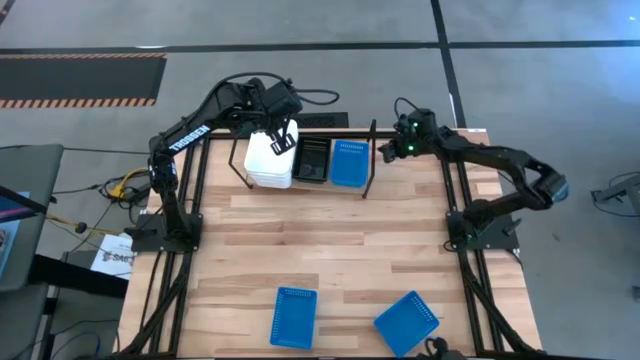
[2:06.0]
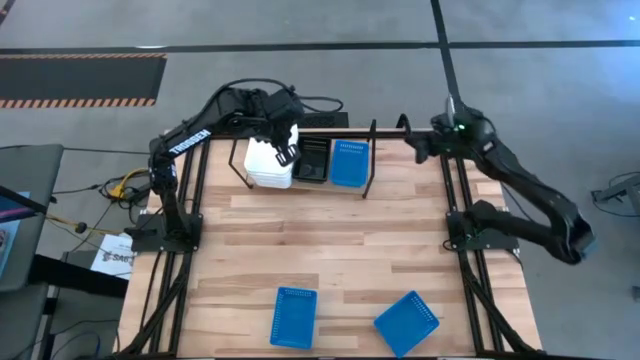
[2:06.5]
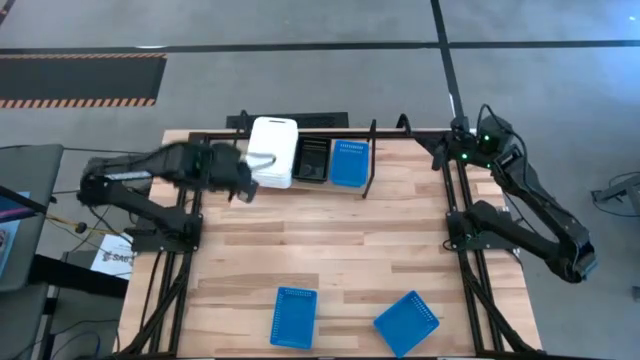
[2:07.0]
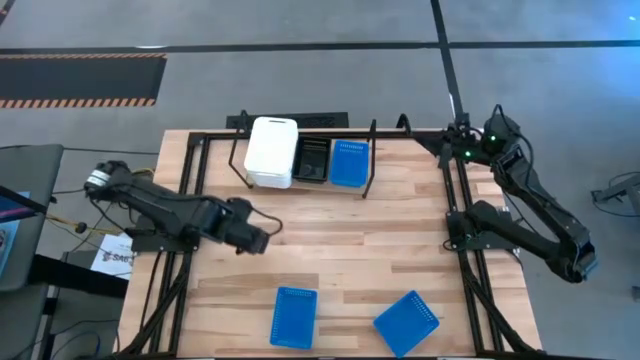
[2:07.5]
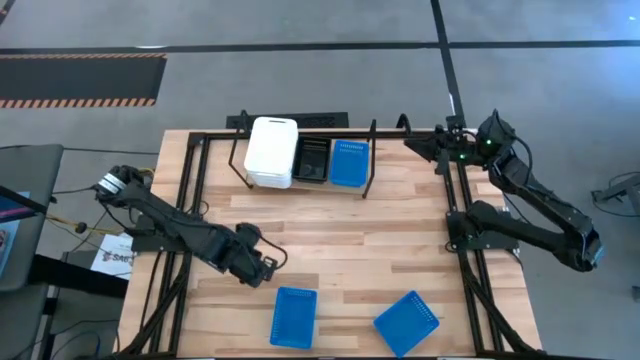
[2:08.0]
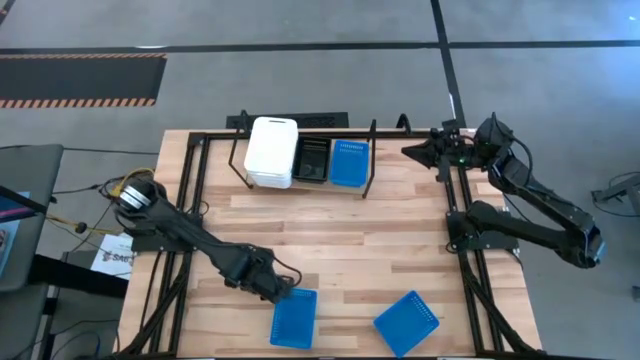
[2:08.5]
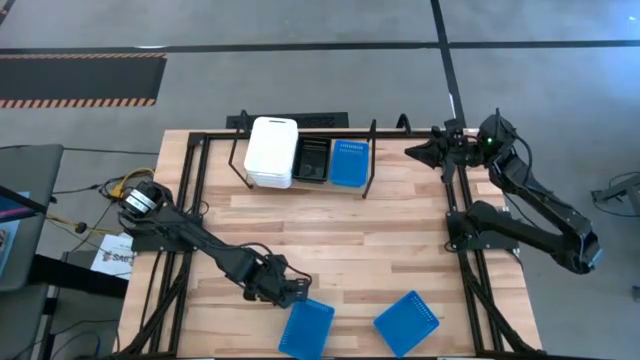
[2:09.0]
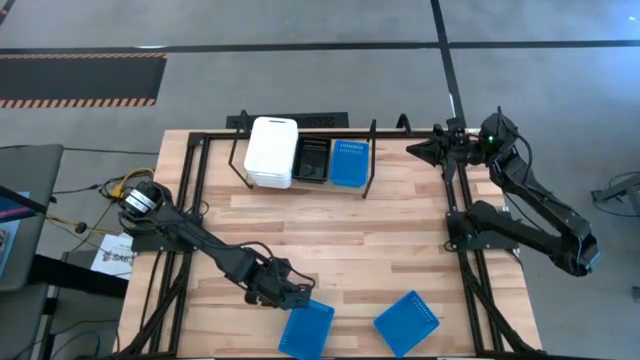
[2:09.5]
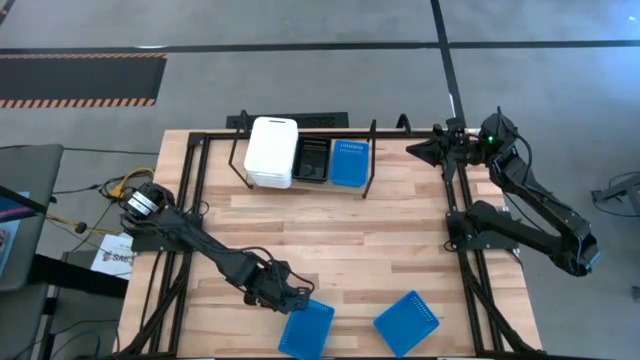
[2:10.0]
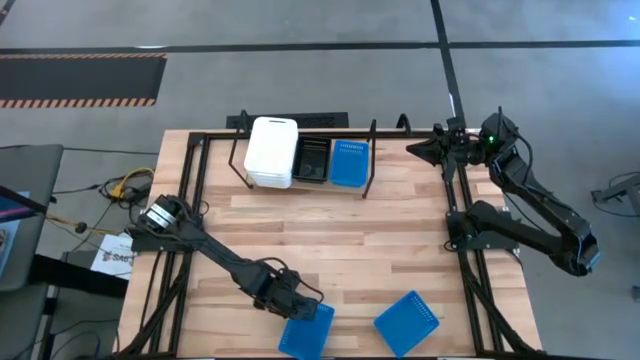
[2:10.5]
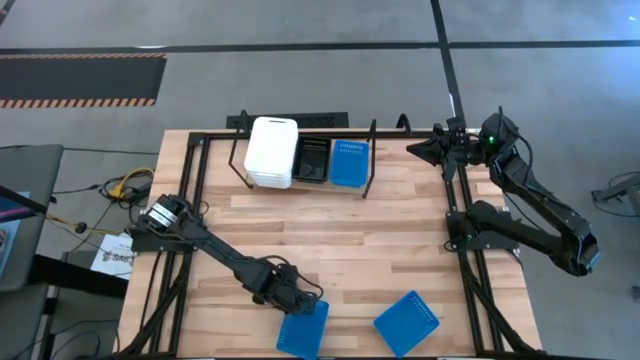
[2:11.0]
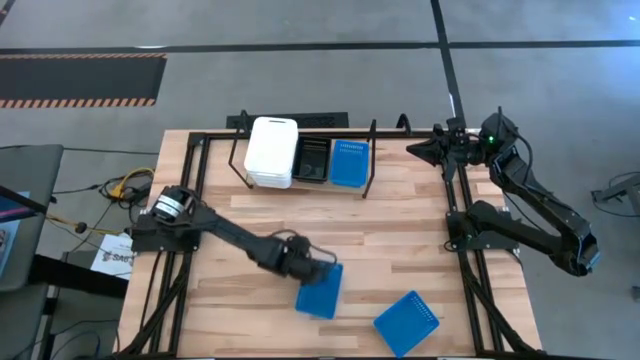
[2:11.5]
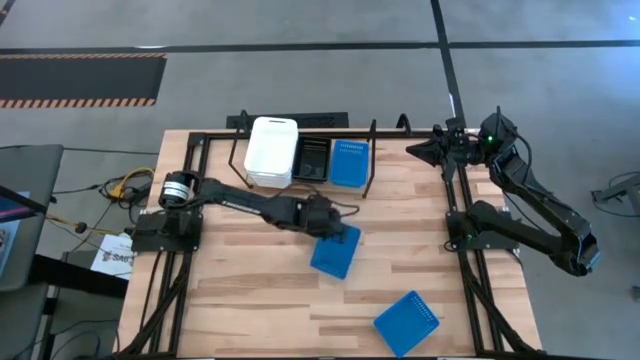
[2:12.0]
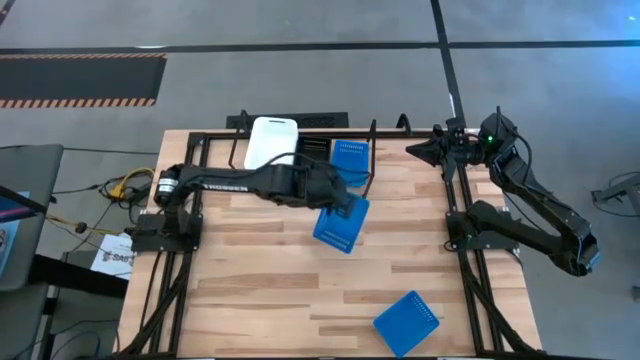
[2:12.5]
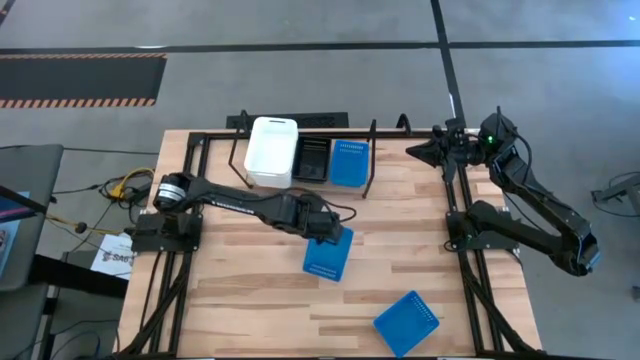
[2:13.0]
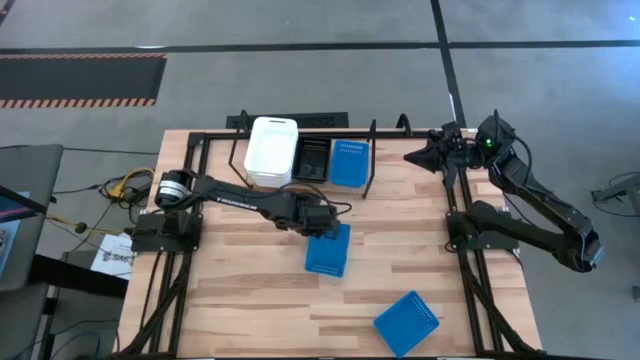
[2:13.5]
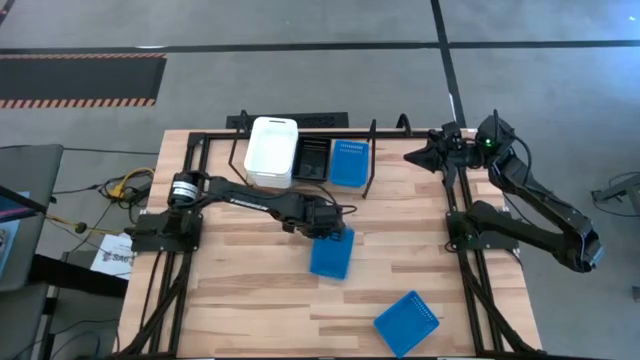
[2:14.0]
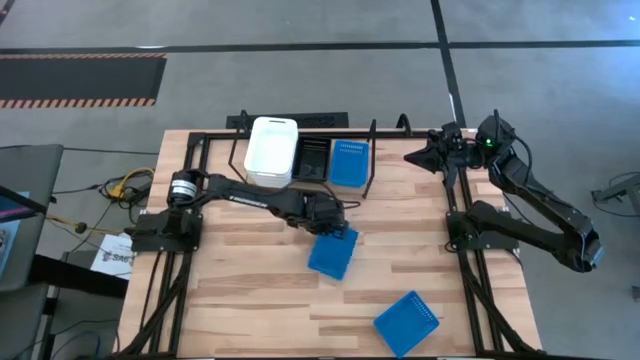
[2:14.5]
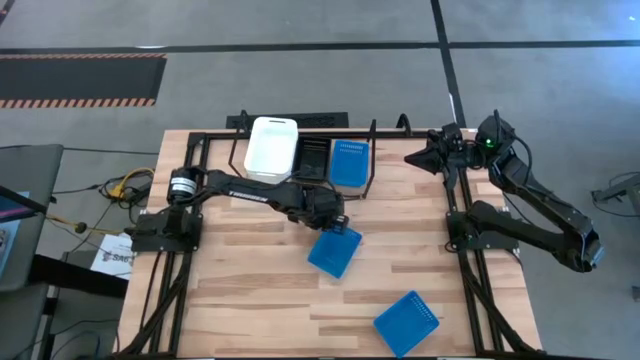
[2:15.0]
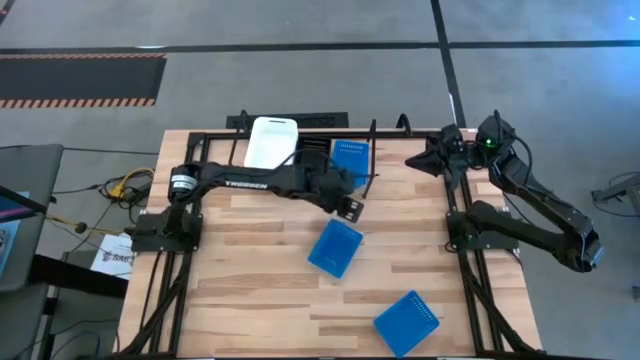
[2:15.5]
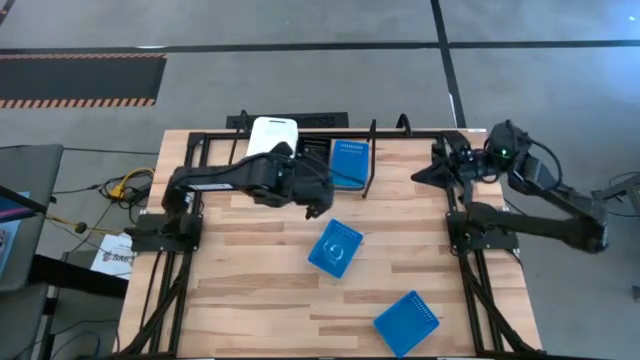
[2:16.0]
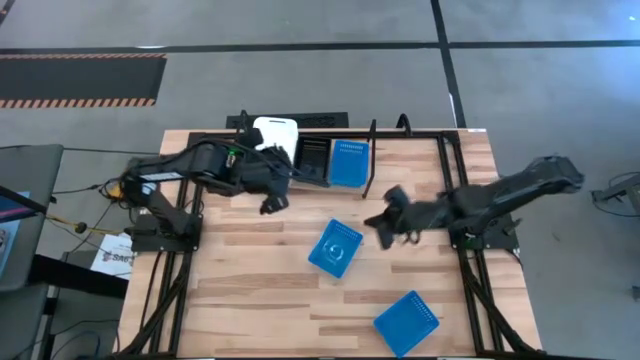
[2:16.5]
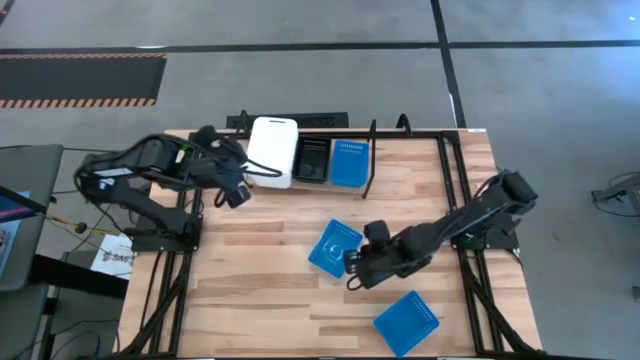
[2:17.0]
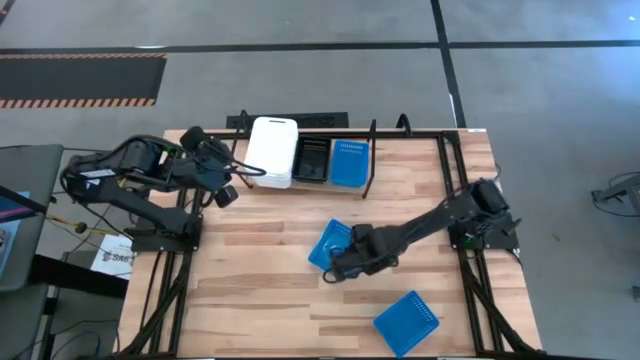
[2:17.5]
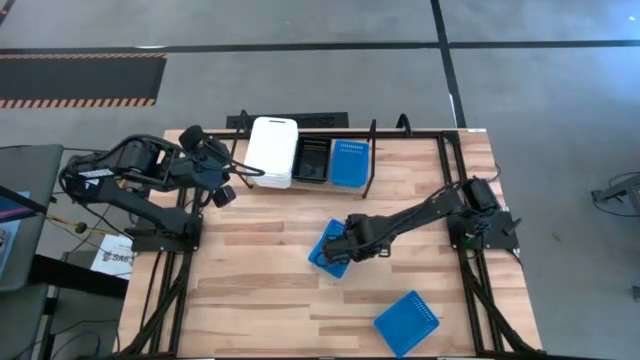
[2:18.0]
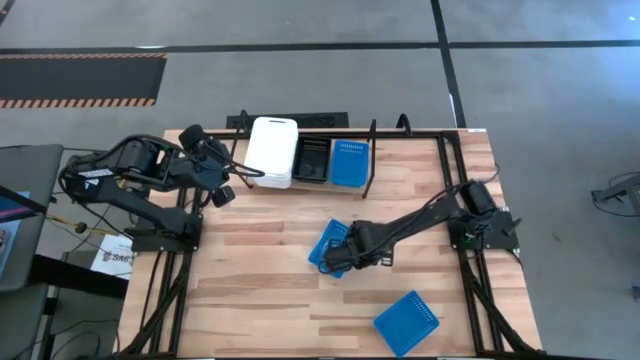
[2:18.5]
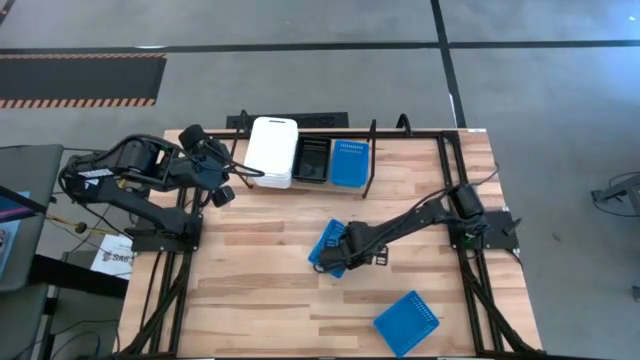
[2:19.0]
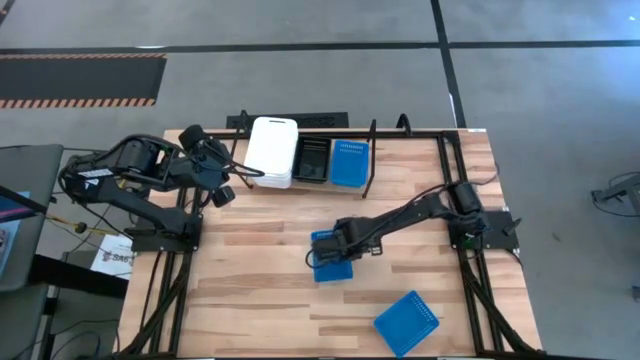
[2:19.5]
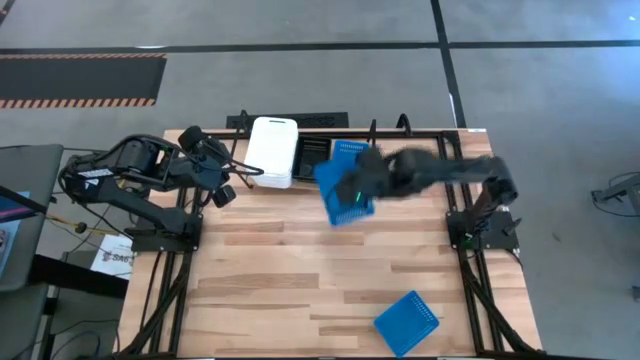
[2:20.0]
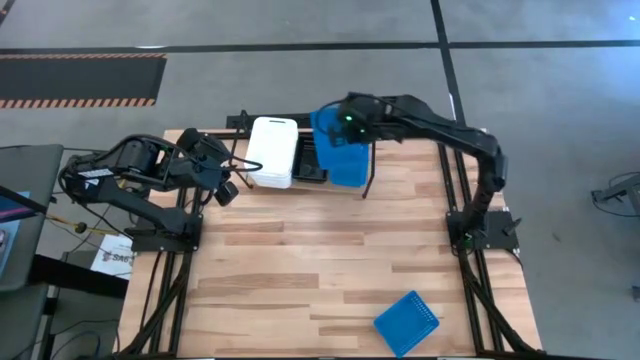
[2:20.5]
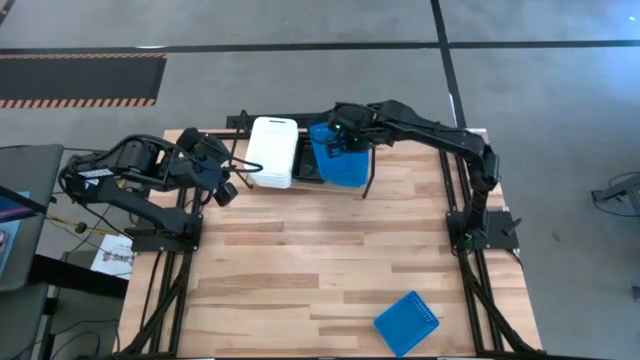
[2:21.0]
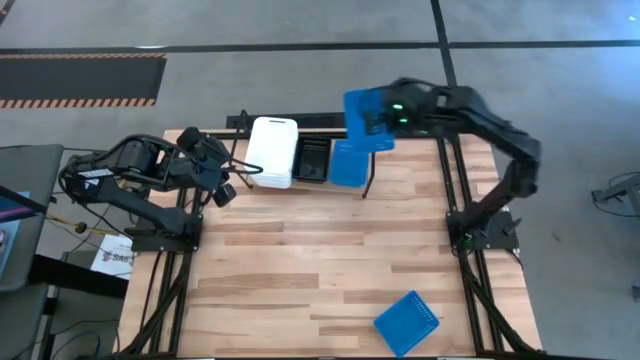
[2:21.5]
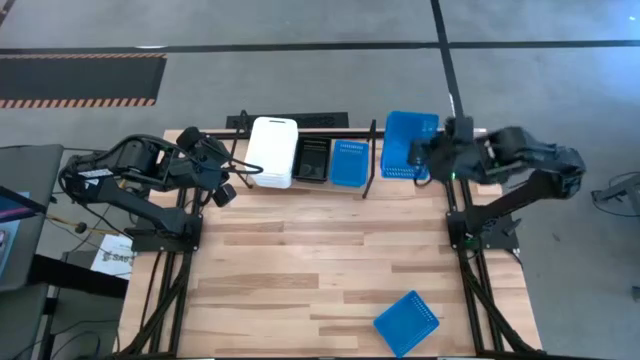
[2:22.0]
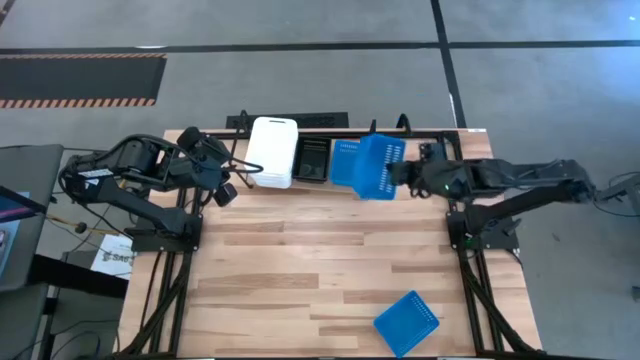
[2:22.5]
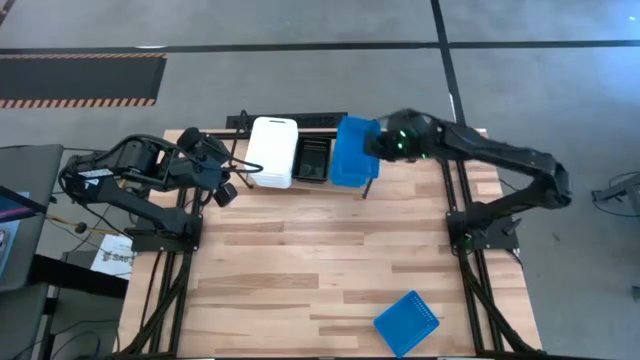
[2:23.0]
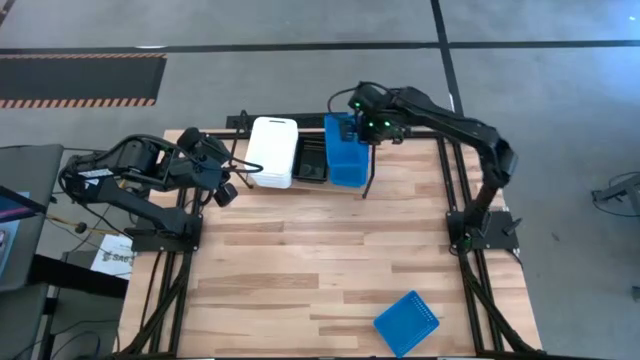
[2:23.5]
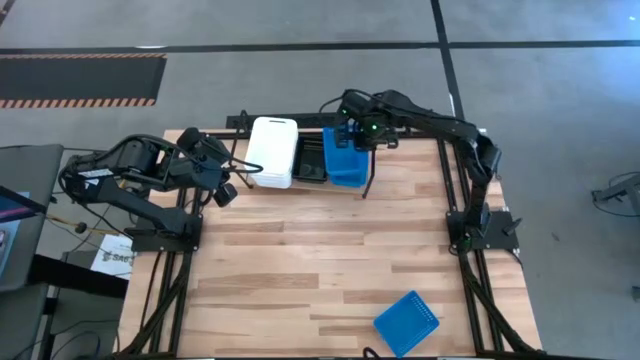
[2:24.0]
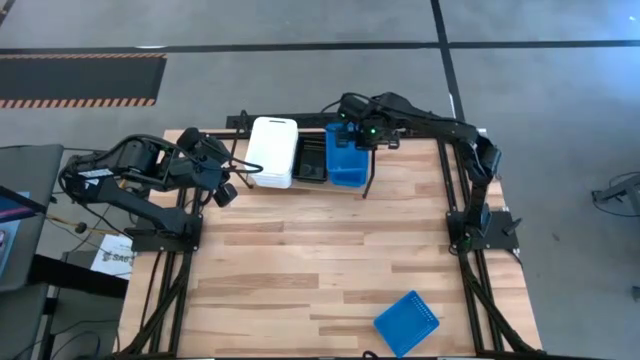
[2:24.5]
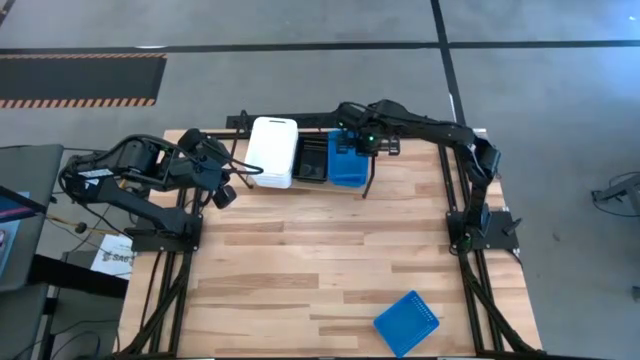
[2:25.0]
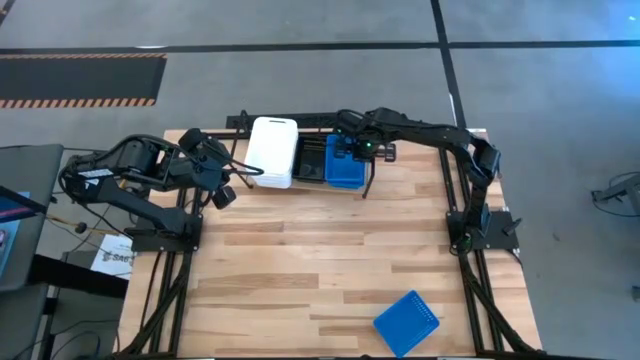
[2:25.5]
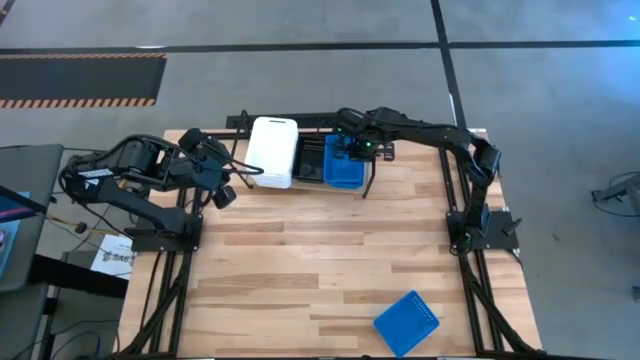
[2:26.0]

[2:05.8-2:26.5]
Task: Stack baskets on shelf by color
Stack the left blue bin on top of the blue bin on the shelf

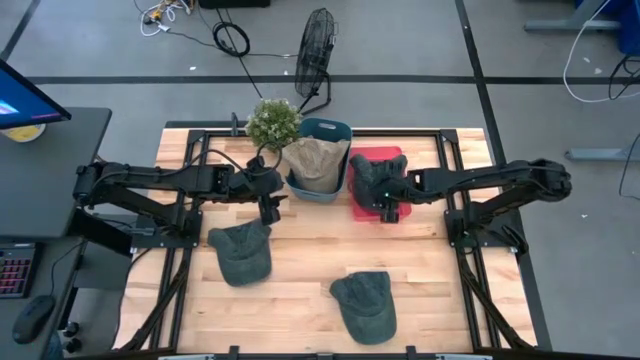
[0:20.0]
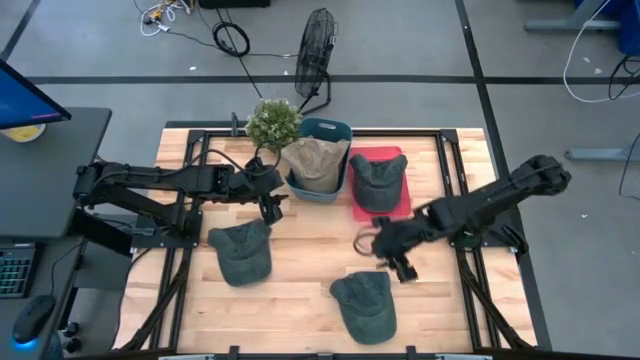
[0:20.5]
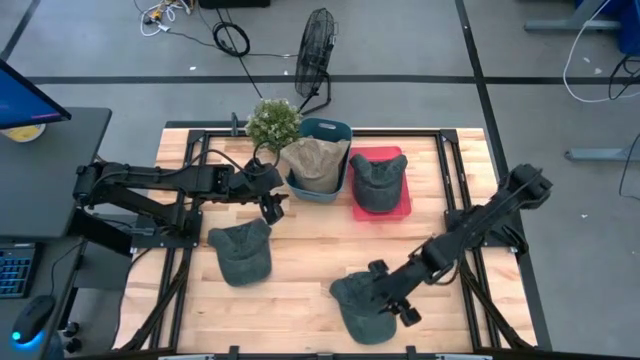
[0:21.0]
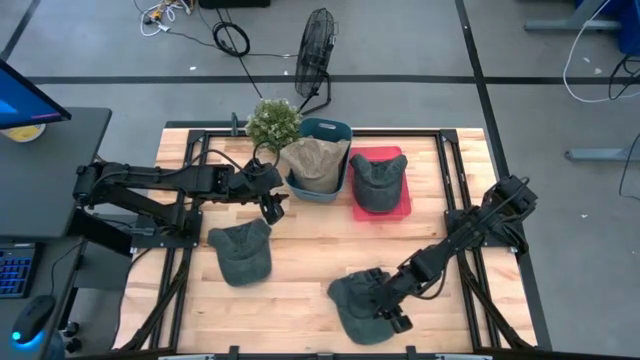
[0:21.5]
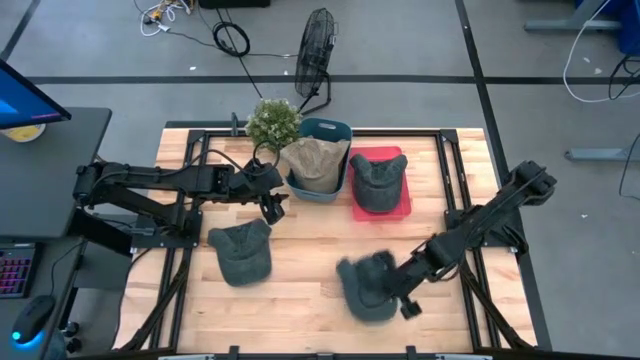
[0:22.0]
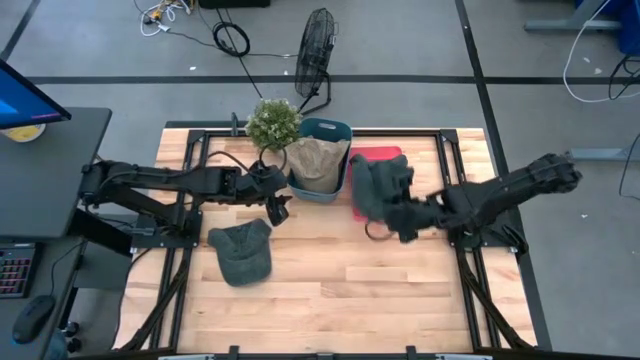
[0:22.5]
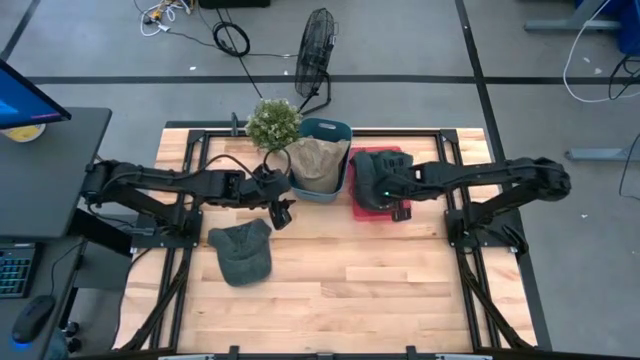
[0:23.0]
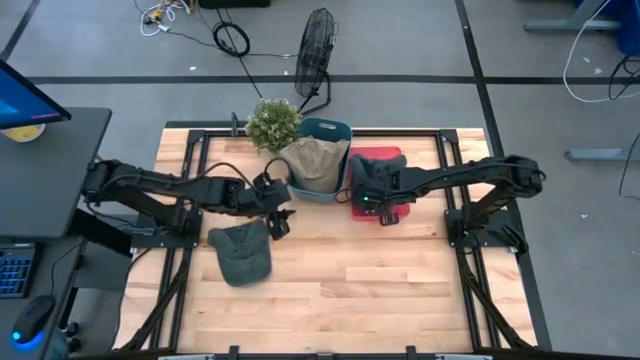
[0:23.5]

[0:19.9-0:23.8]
Task: Pick & Place hat
Put the bottom gray cap into the red bin
